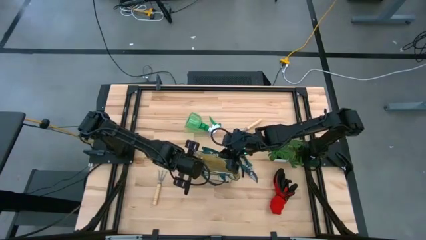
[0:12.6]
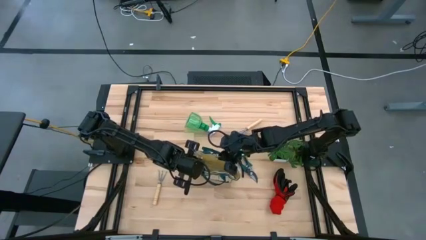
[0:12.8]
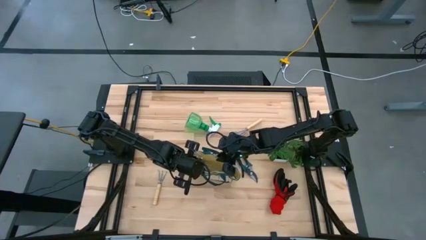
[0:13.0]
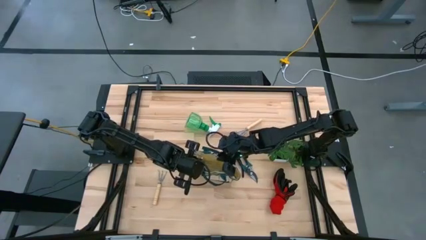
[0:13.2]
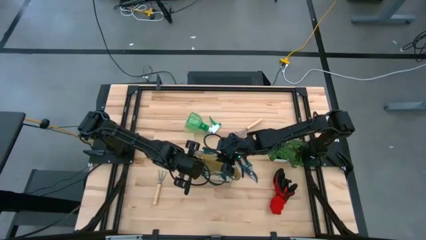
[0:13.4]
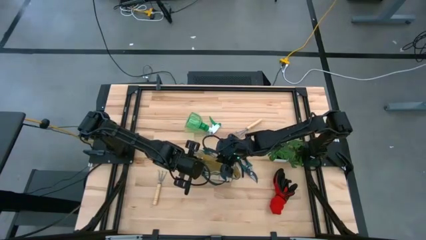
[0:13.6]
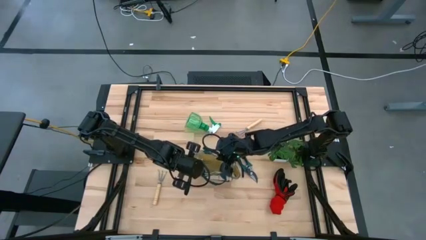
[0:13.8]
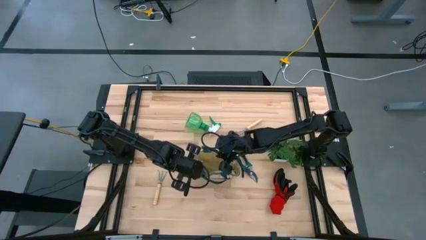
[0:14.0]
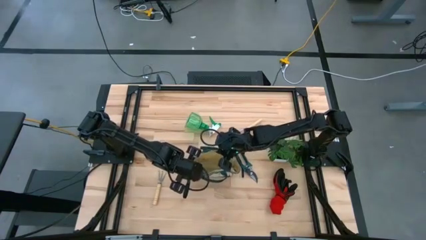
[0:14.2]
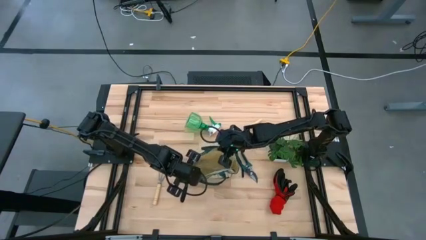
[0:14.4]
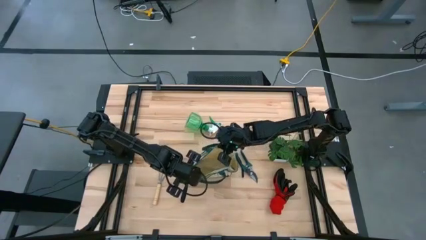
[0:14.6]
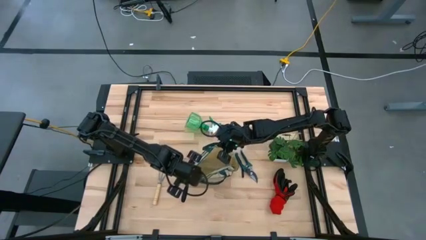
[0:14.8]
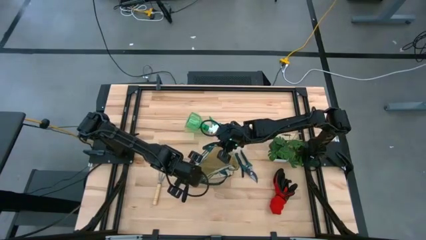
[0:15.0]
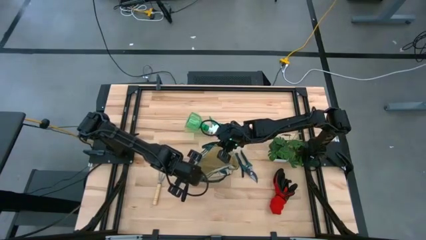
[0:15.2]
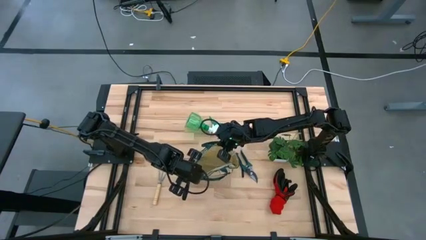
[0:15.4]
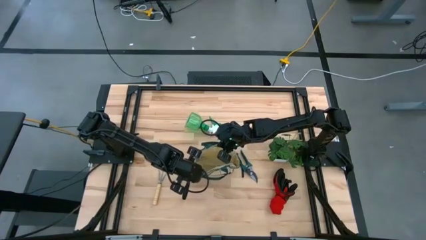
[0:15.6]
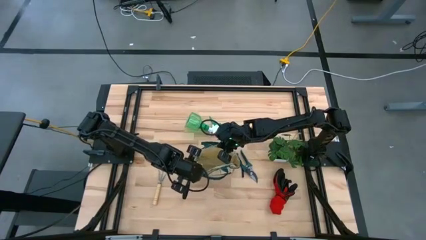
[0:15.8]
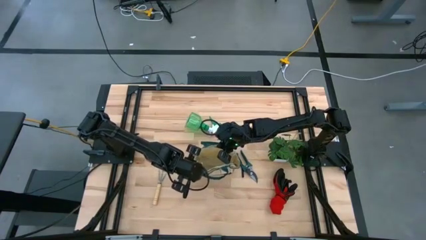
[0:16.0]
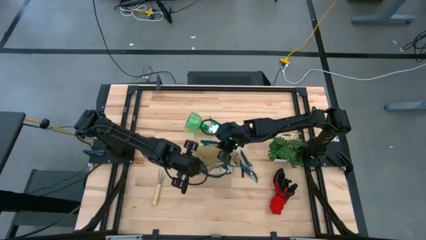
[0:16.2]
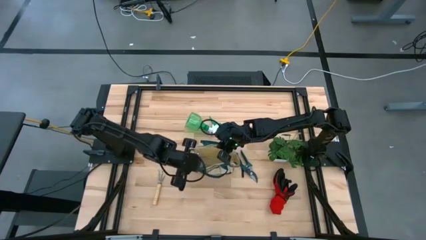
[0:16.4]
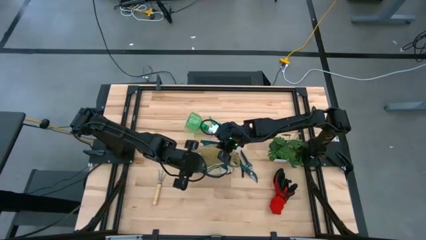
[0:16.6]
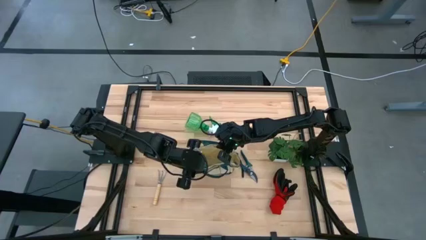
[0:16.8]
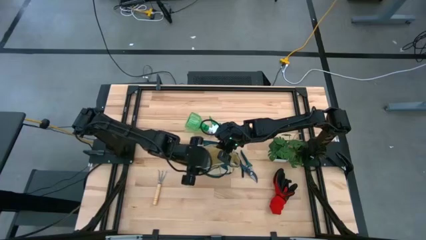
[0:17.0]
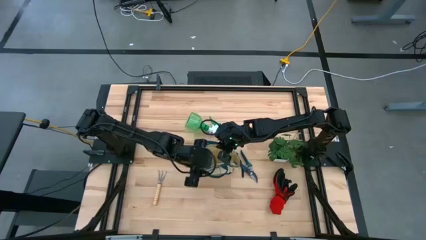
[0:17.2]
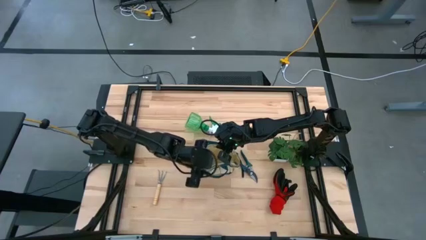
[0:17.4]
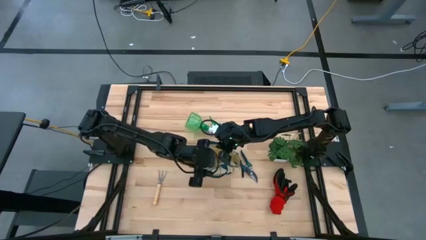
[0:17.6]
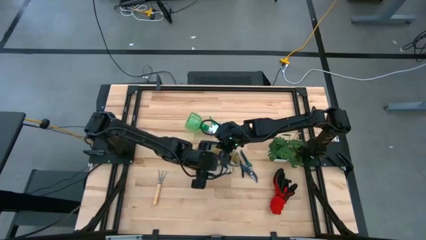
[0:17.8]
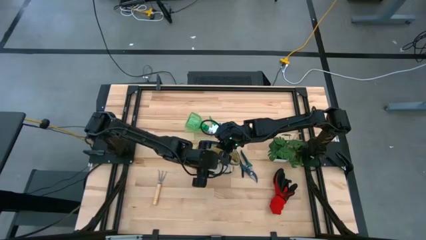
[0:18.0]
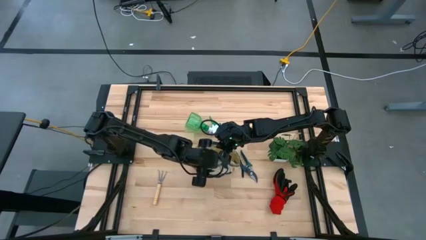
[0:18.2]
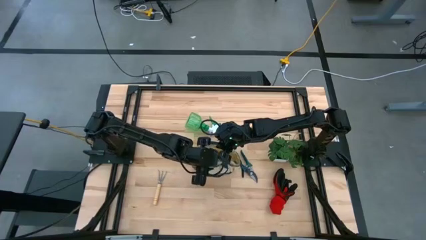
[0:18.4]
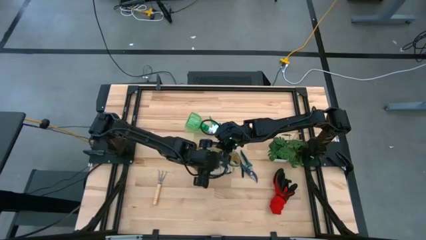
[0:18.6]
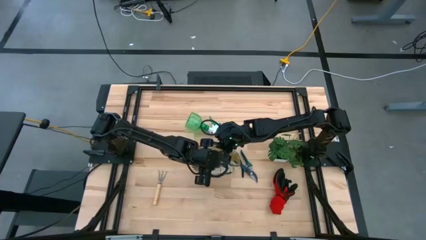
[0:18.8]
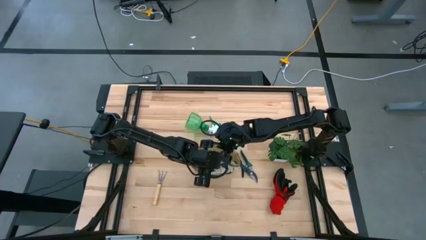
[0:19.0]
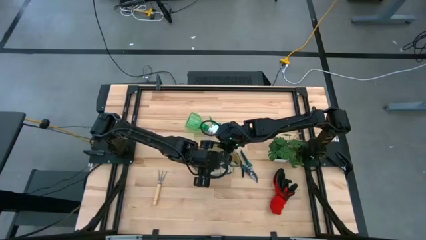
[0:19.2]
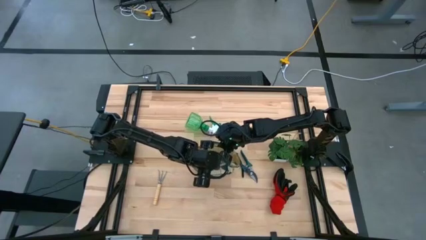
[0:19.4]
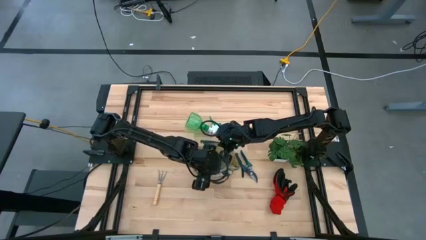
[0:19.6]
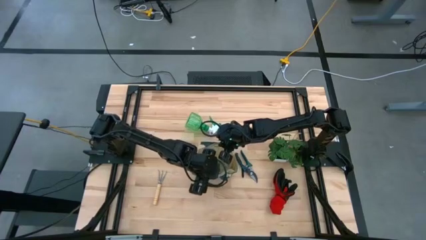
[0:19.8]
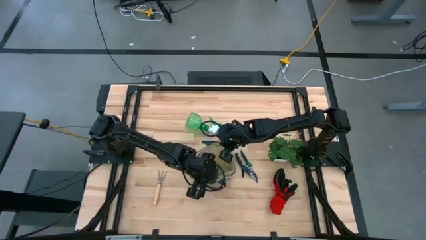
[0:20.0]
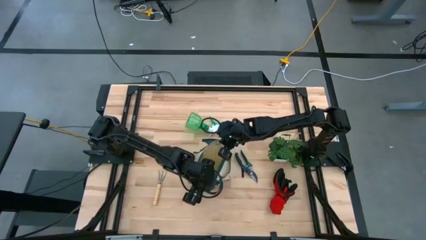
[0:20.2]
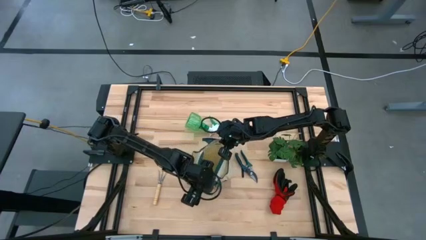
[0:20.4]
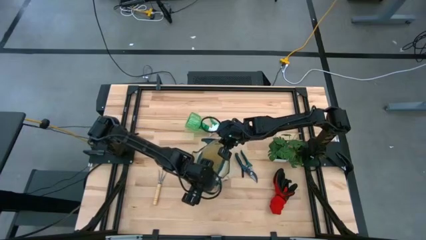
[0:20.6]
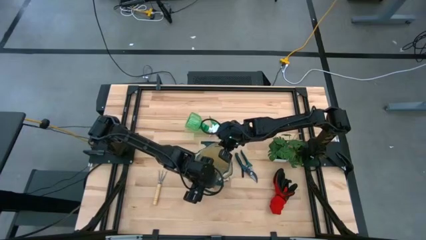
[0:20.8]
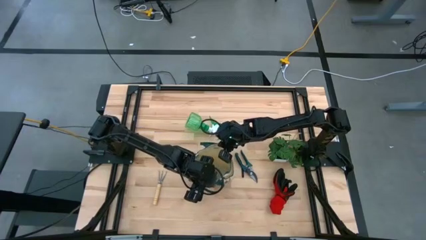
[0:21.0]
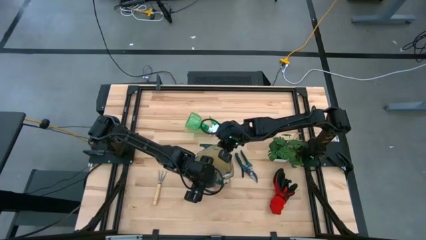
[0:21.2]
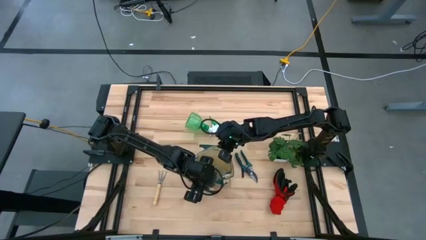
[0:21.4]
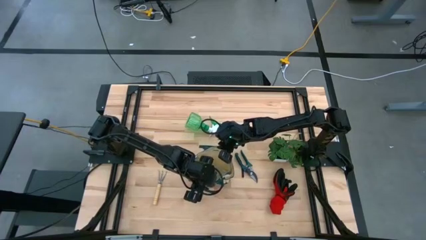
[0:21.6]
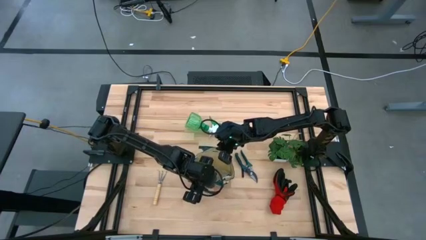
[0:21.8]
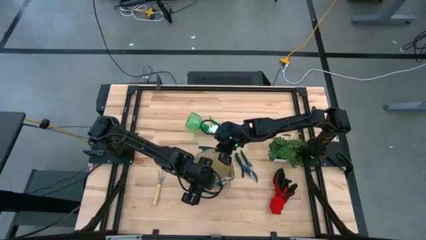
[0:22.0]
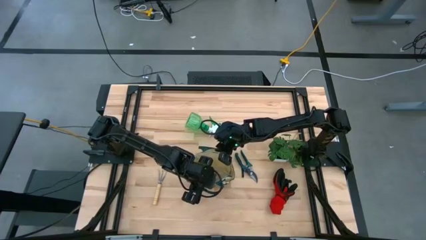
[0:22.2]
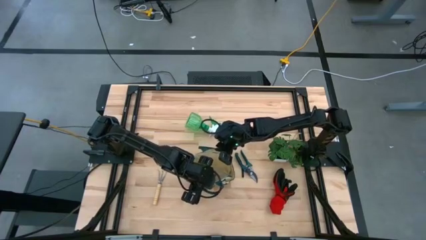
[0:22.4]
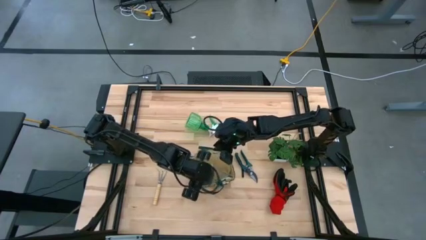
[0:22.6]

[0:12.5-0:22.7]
Task: Pick & Place Garden tools in Gardening bag
Prepare the gardening bag

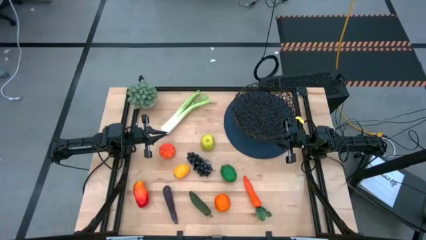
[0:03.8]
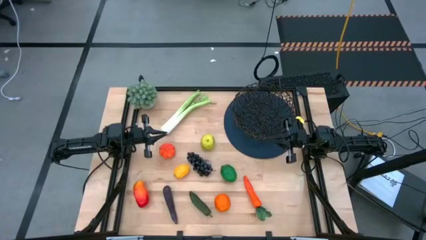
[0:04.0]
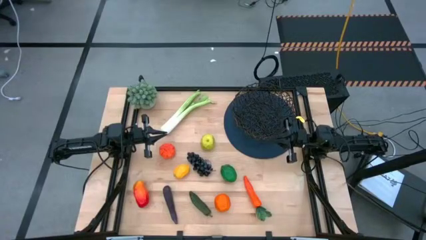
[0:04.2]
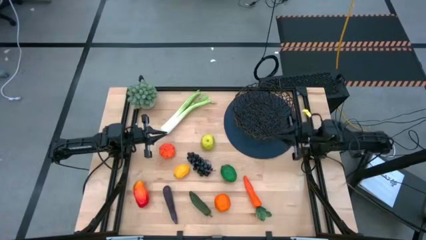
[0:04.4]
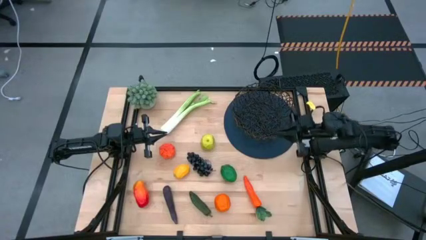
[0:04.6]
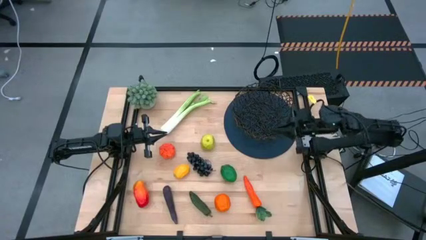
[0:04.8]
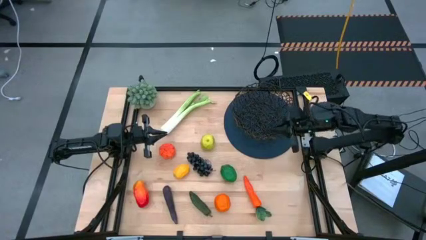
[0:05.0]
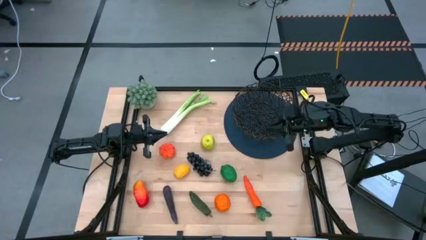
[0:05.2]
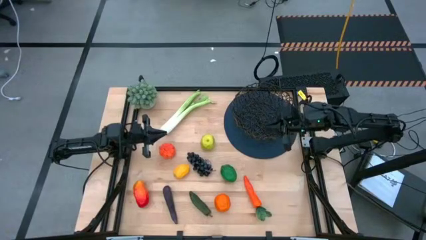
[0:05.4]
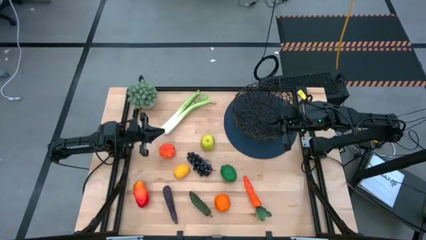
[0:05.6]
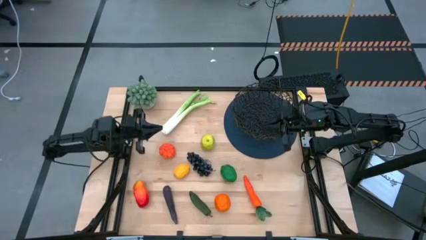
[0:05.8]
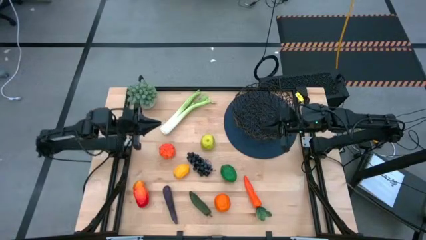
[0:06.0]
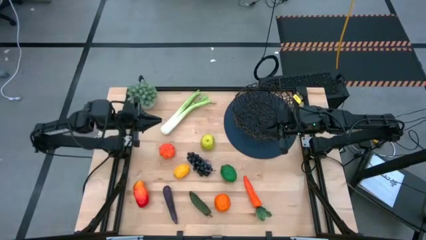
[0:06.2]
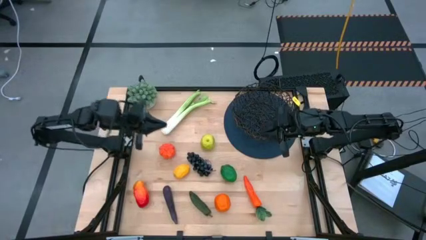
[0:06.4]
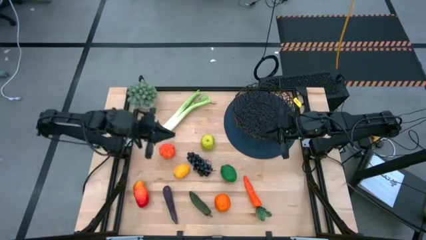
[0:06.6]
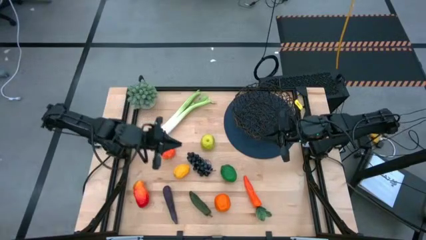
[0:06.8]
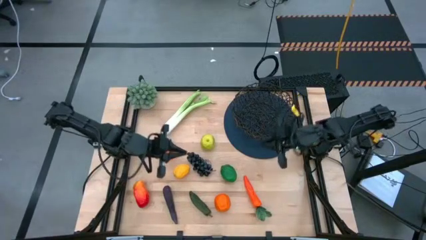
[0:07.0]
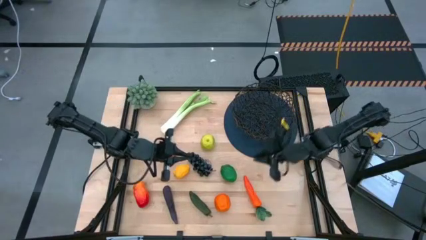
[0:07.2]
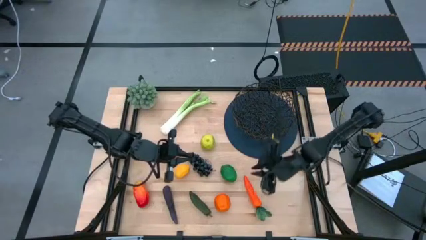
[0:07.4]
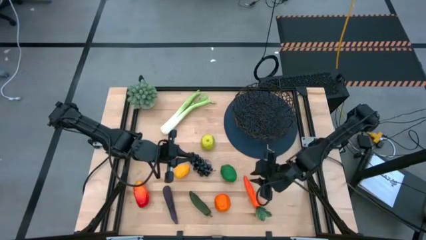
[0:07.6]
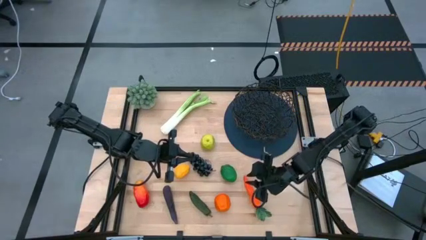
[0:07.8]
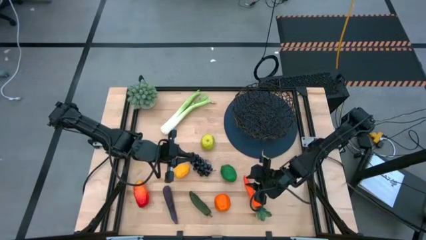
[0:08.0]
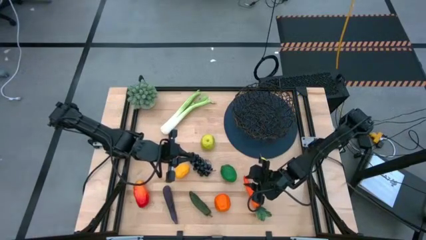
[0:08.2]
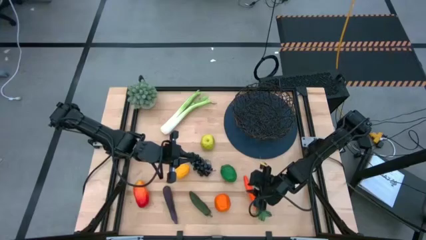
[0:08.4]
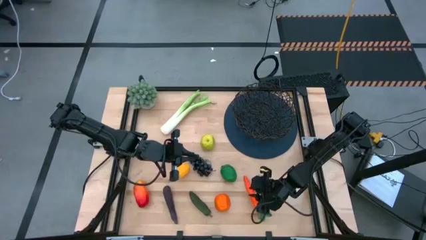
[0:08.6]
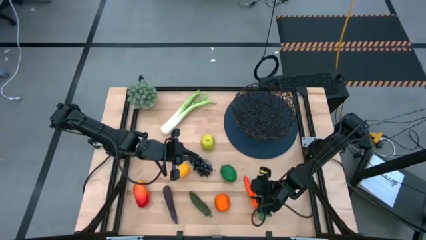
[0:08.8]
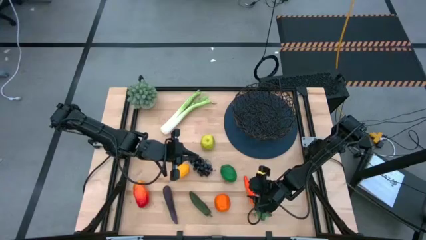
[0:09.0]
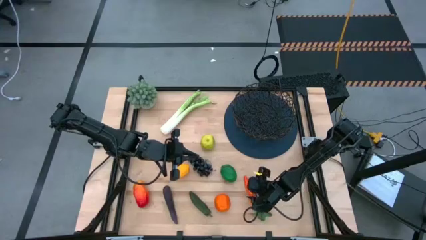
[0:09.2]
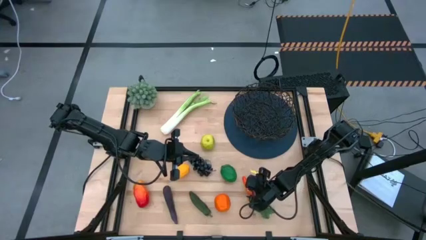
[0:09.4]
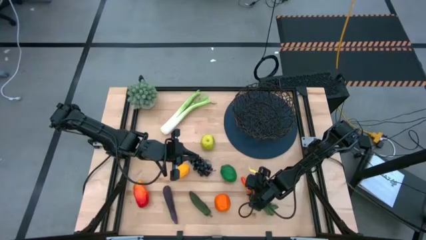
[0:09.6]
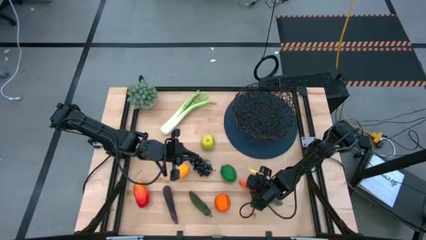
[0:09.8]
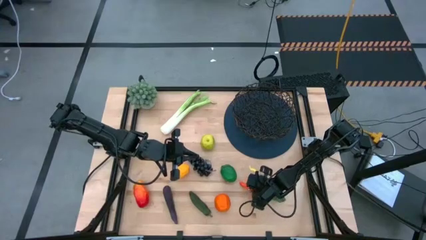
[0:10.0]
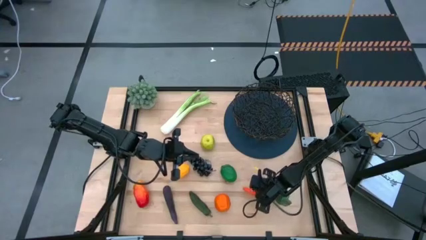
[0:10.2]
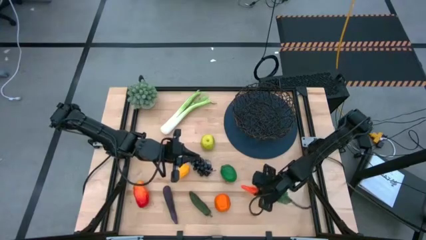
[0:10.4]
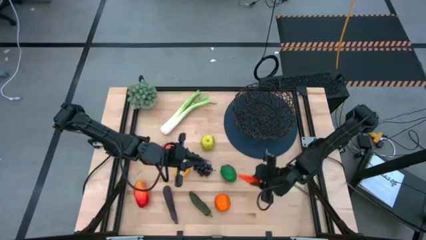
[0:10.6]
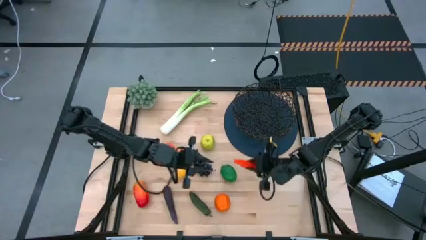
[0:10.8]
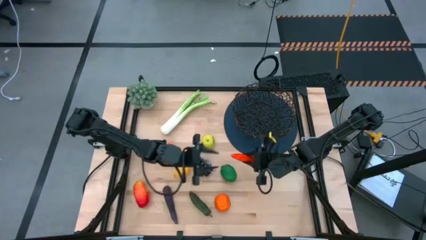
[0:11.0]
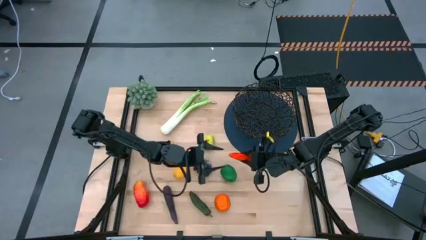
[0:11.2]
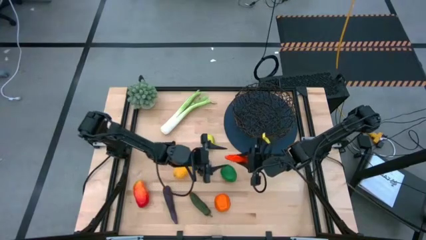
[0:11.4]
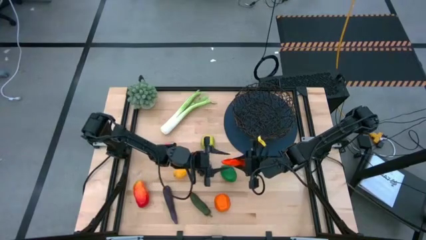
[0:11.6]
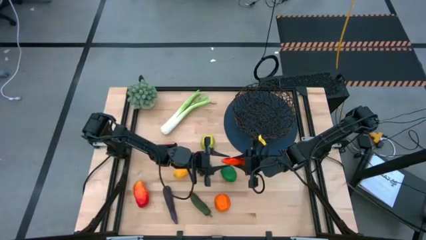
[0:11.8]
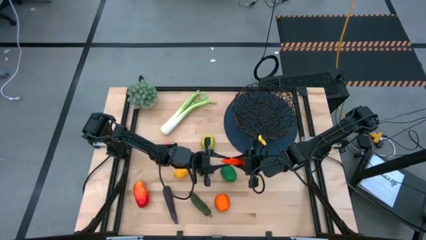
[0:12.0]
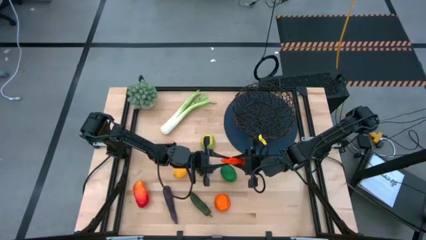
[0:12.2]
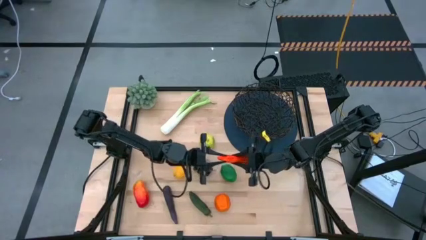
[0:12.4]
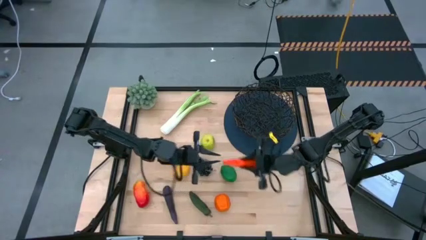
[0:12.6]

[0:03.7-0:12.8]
Task: Build produce basket
Put the orange carrot into the black wire basket
